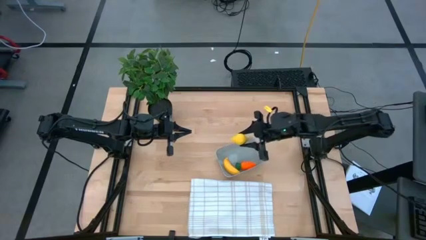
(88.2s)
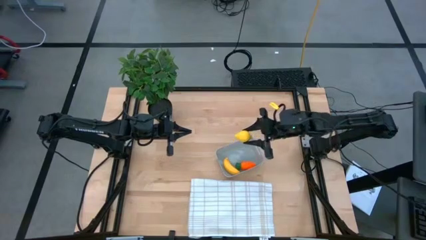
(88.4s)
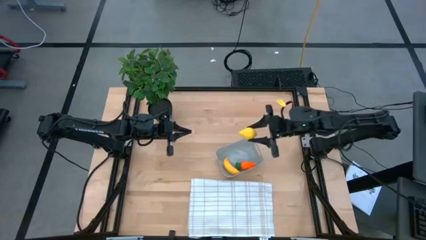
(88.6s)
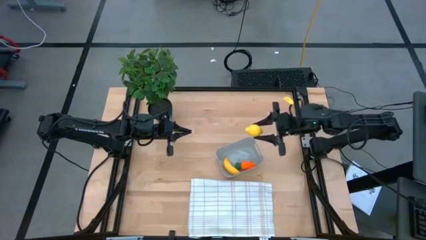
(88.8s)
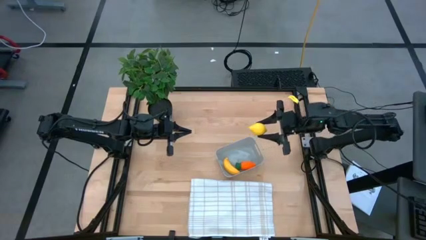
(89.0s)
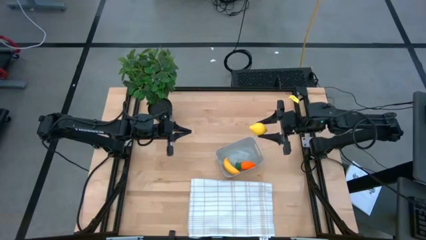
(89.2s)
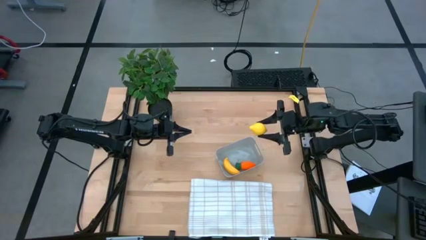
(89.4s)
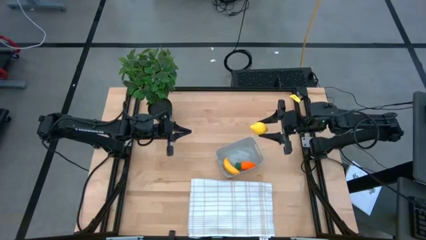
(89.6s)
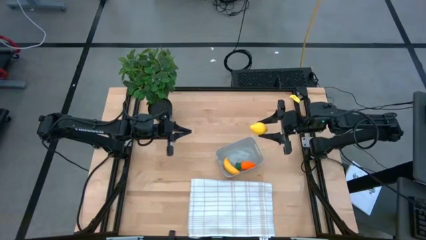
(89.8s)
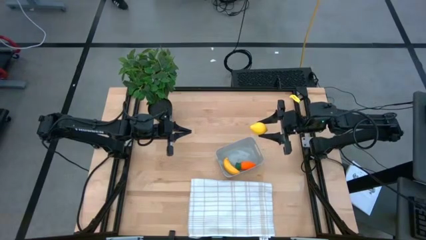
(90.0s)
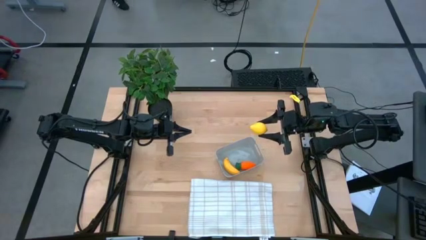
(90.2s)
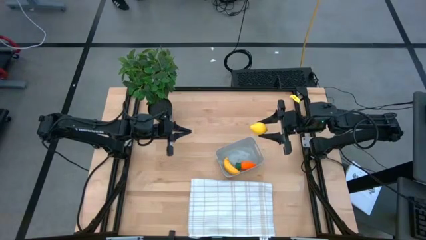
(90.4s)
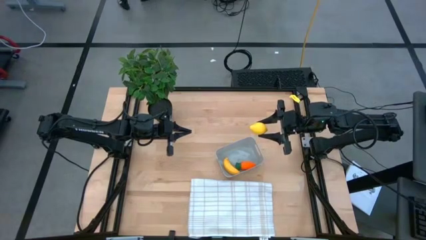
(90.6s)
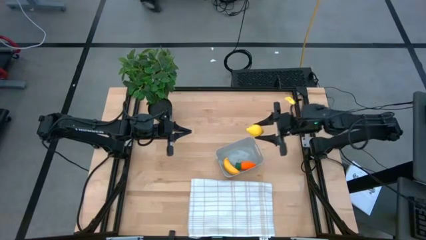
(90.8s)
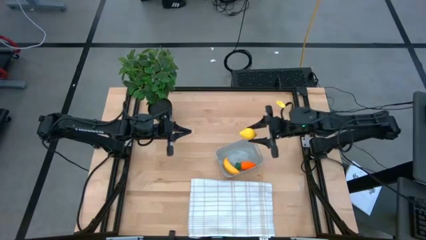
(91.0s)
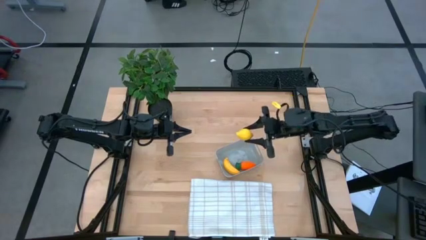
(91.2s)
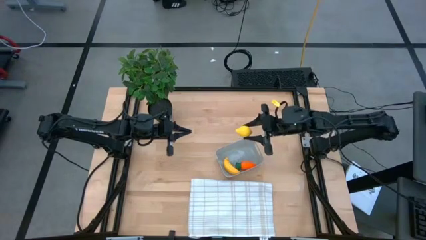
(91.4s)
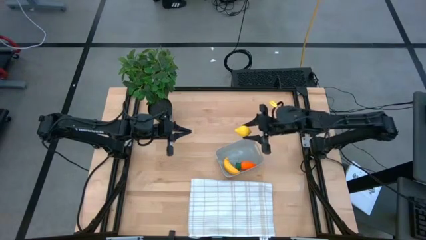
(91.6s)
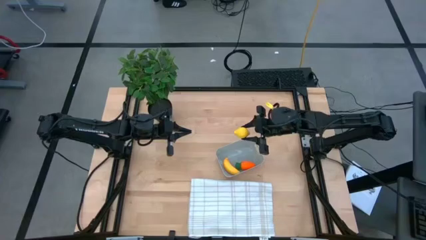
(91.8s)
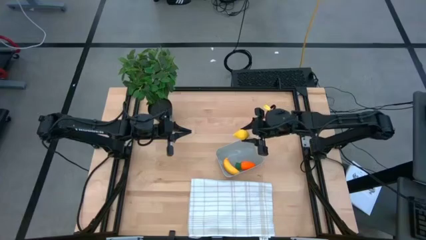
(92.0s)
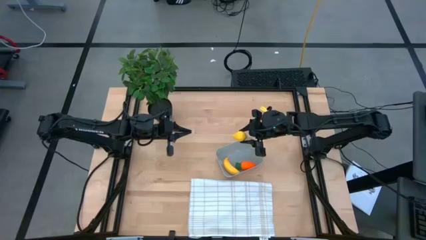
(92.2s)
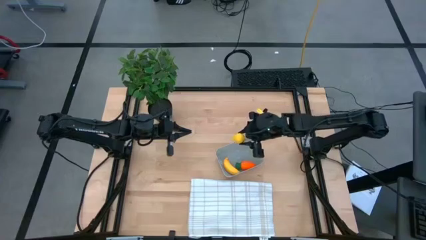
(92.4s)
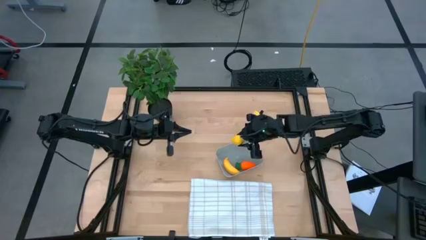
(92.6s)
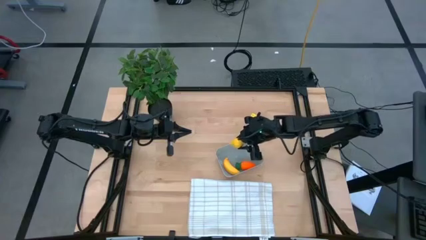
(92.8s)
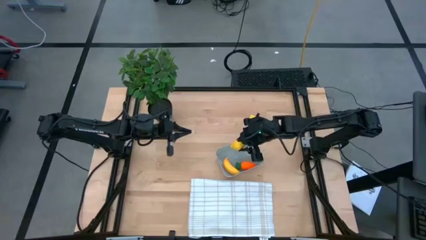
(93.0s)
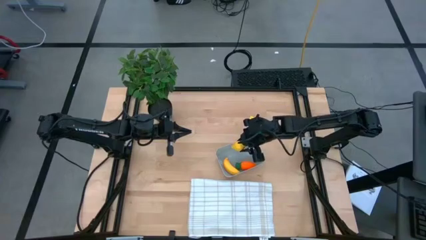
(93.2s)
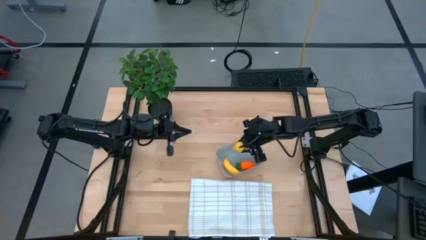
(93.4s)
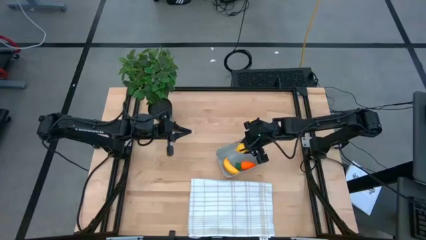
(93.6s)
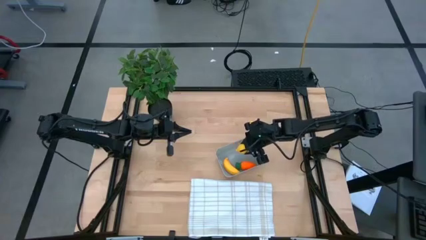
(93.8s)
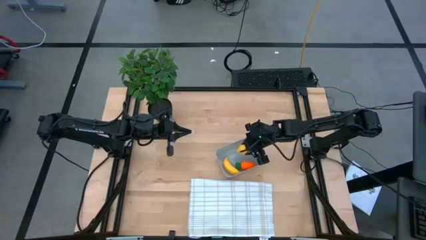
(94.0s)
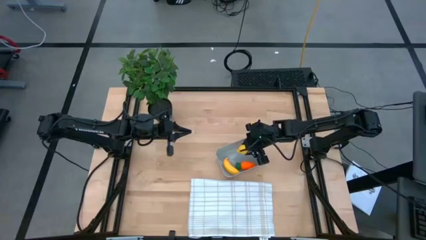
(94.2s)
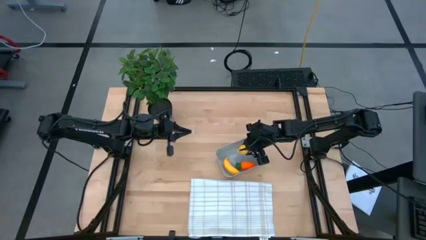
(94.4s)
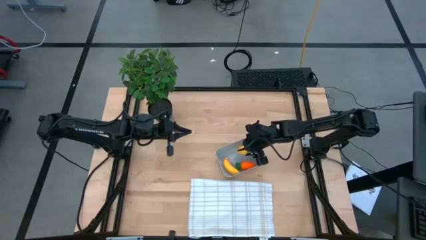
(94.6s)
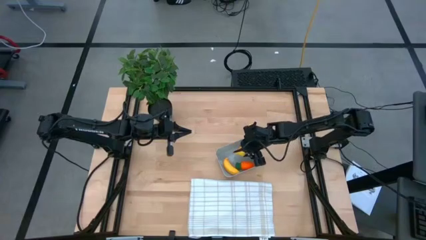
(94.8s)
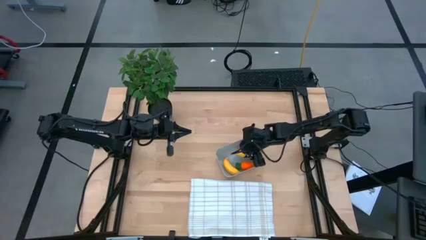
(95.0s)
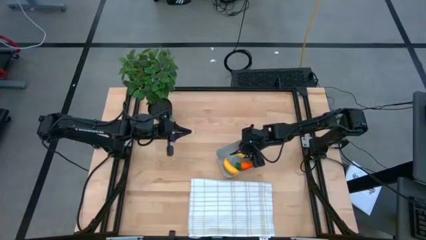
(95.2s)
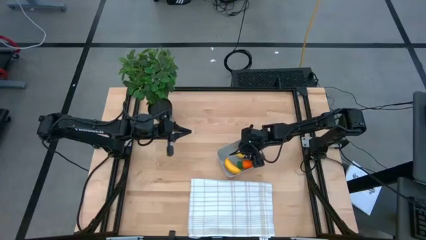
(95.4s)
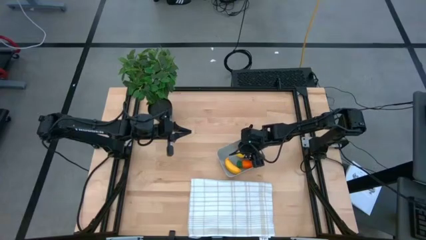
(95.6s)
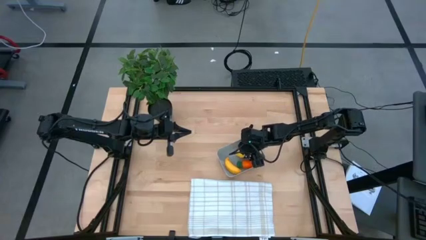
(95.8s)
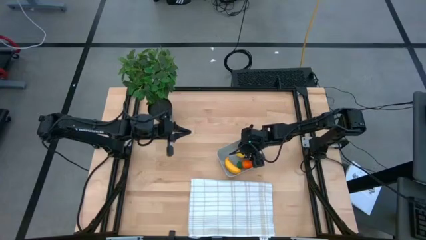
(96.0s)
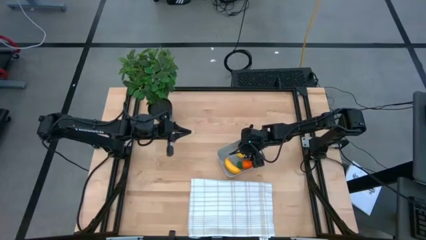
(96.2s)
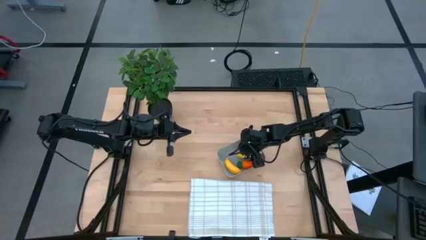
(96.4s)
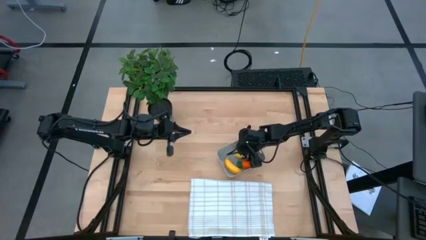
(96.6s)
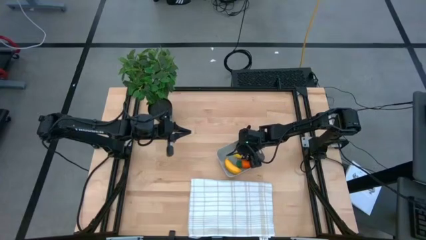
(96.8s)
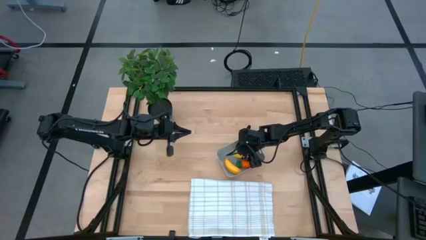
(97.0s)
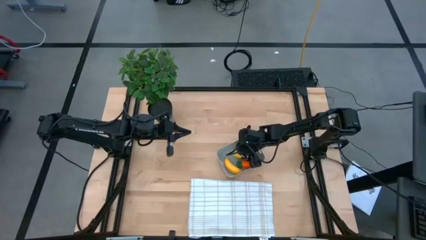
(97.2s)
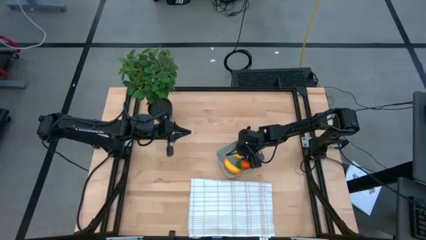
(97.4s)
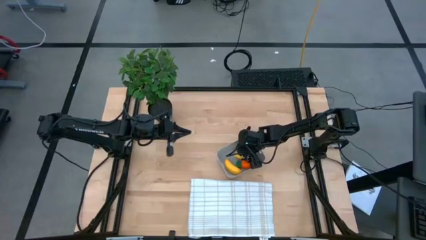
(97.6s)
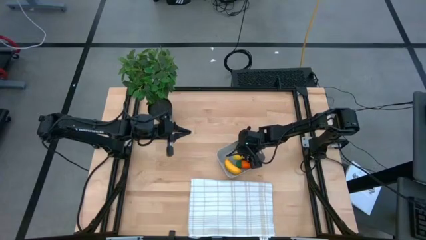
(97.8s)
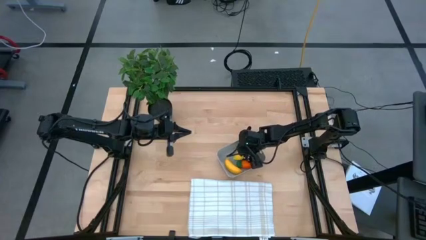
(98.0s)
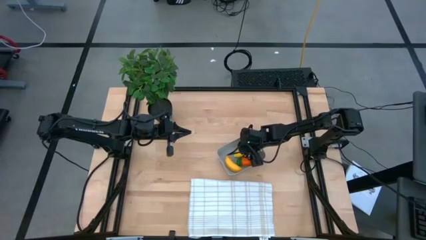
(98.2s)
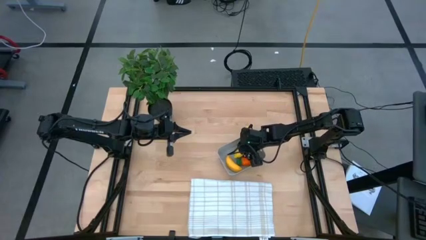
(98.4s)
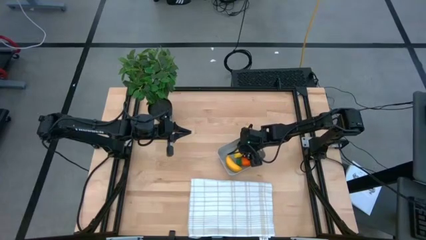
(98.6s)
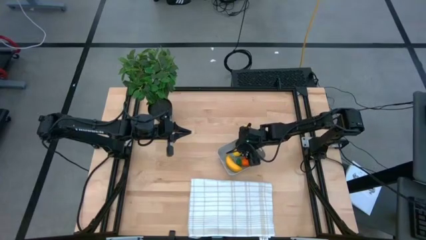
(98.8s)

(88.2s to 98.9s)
Task: Pick and placing Produce into tupperware
Adjust the yellow lemon in the gray bin

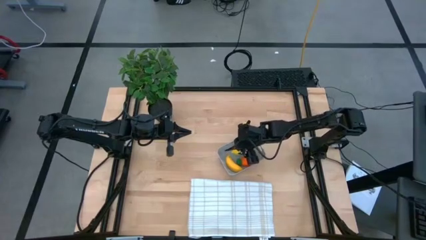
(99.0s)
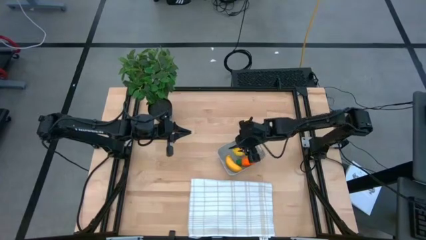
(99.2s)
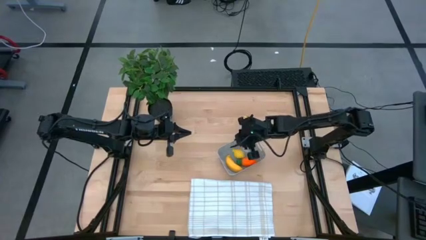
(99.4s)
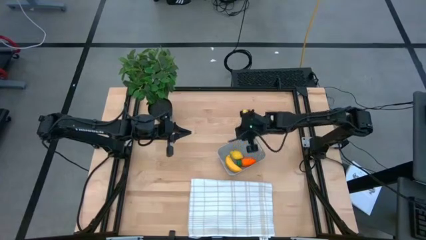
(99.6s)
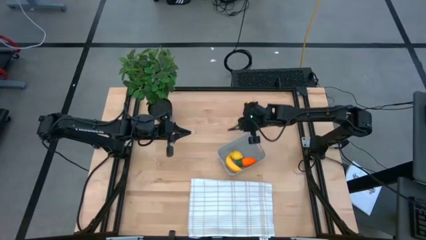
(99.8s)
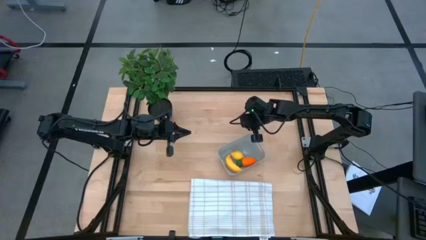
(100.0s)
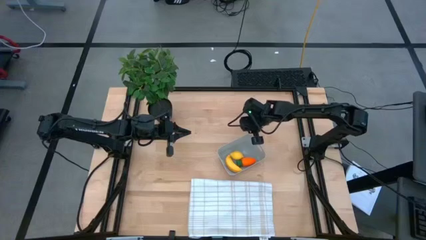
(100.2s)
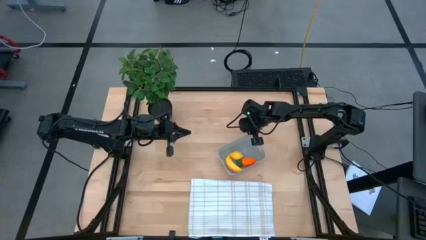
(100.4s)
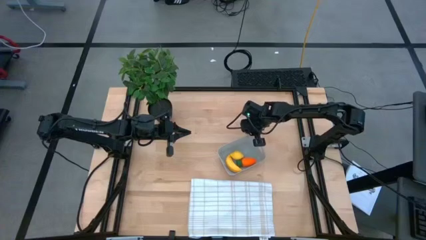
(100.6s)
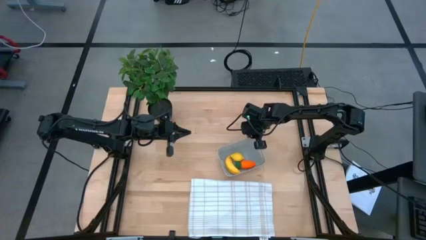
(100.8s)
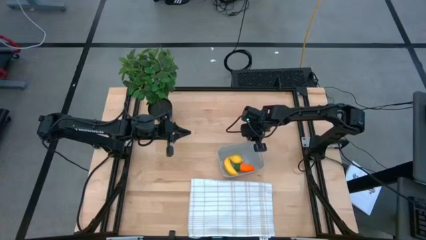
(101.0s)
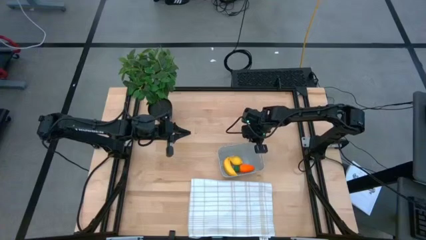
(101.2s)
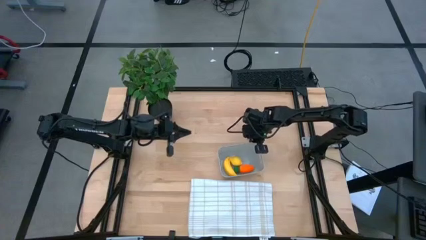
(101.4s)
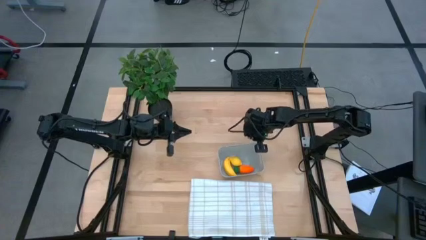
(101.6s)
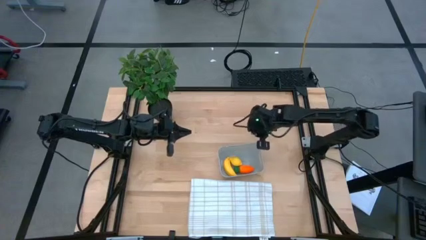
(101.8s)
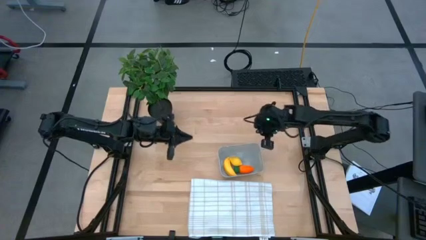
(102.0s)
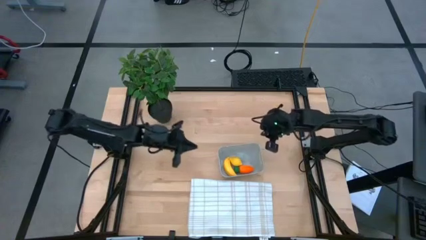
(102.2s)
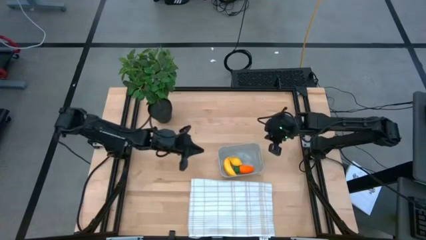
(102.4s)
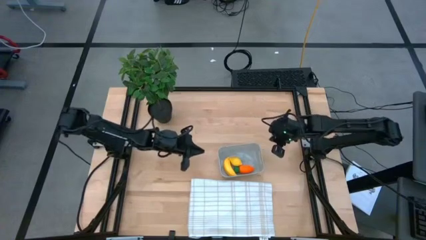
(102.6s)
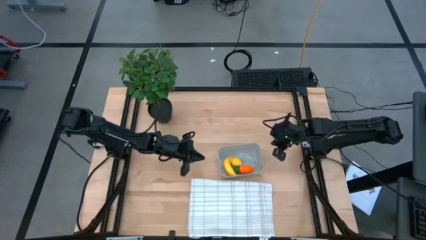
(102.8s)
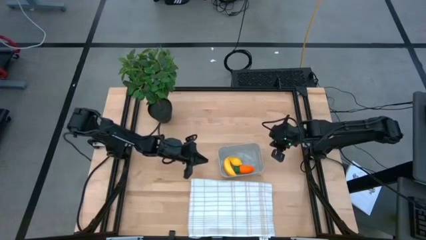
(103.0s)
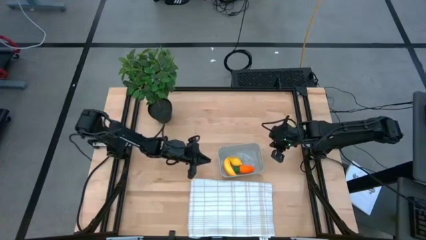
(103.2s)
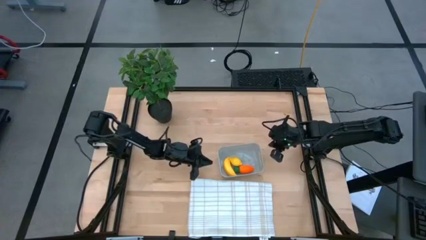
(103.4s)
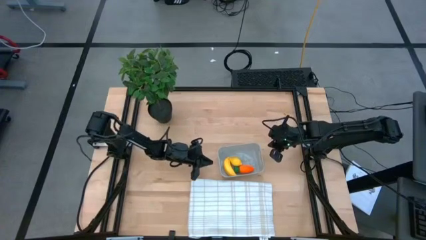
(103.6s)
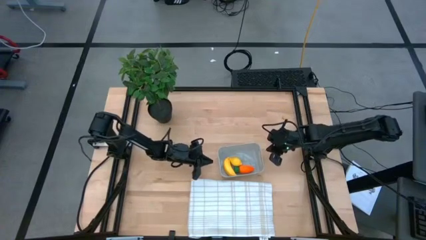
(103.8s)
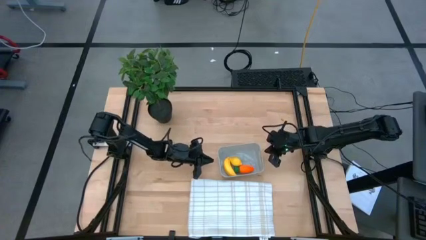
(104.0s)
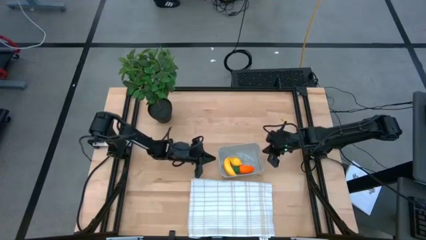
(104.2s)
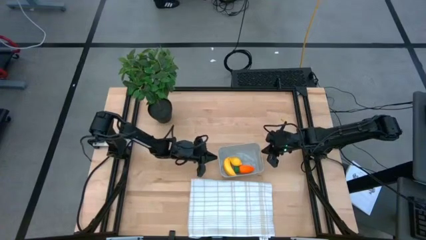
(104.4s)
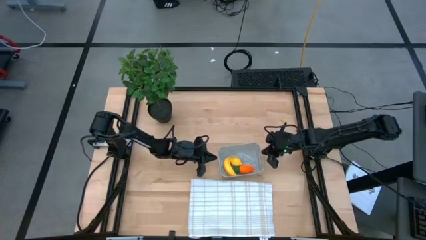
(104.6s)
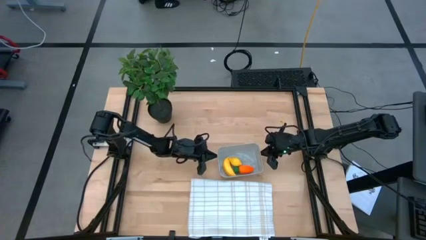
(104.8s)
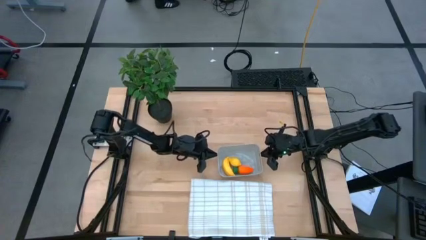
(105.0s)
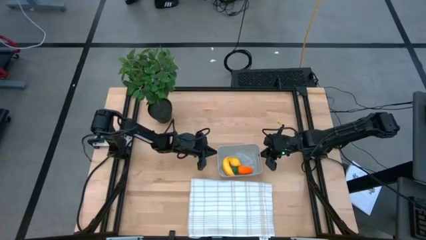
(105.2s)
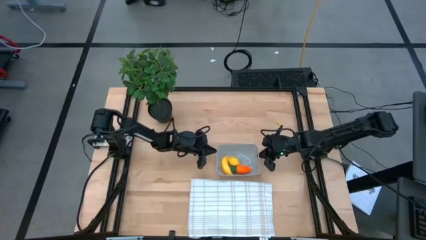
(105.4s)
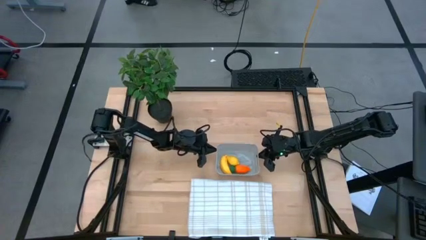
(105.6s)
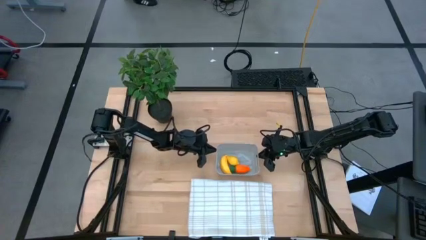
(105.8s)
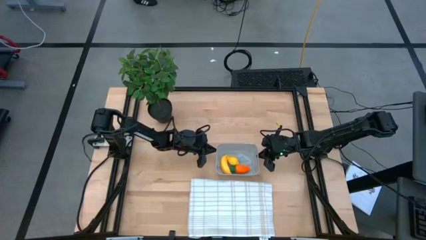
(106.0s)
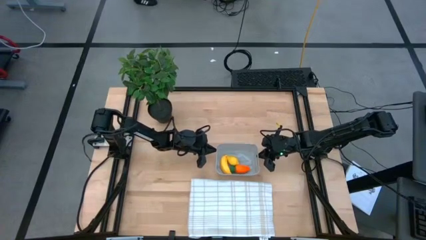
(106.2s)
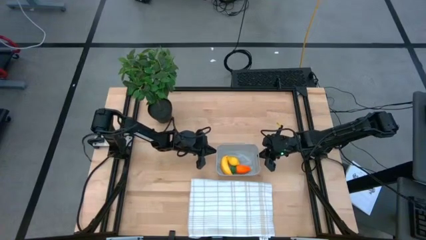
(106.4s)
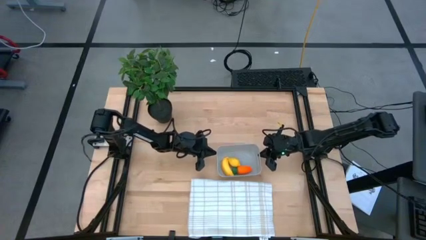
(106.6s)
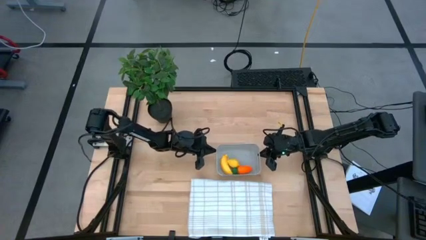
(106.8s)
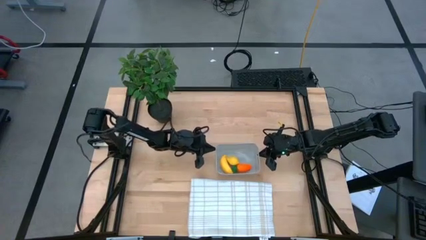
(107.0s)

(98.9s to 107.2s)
Adjust the gray bin
